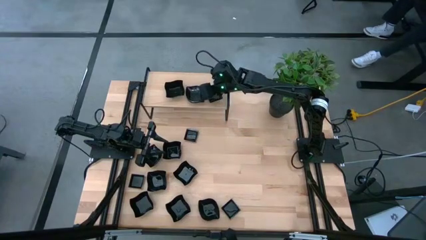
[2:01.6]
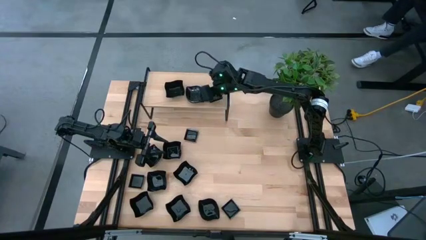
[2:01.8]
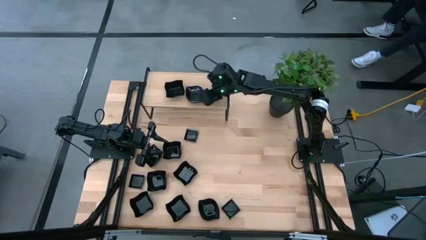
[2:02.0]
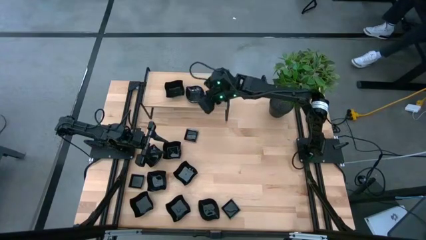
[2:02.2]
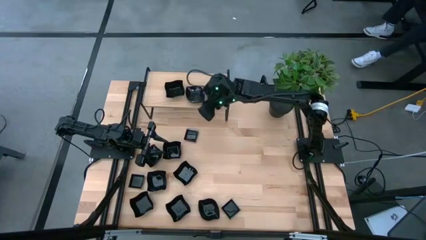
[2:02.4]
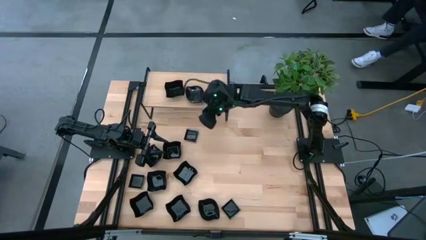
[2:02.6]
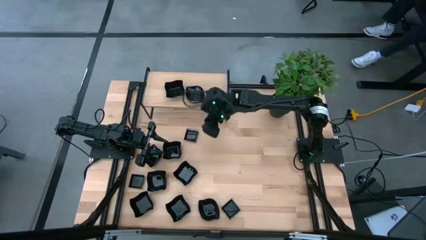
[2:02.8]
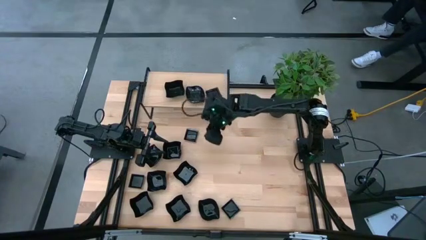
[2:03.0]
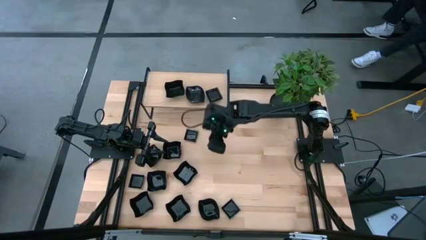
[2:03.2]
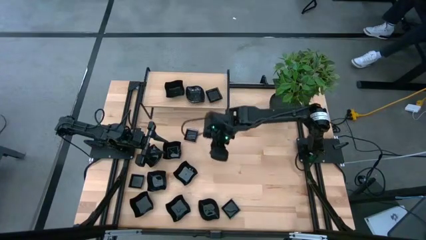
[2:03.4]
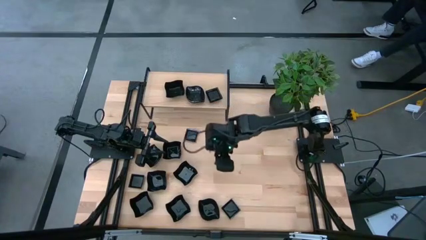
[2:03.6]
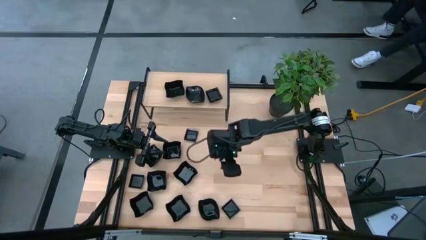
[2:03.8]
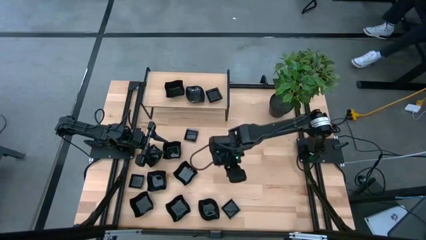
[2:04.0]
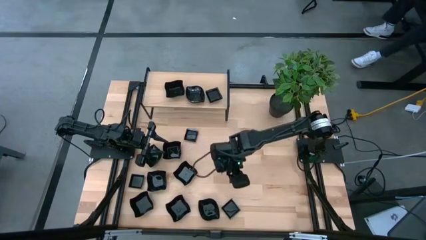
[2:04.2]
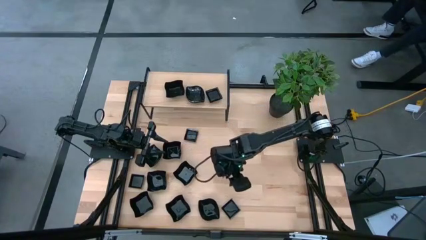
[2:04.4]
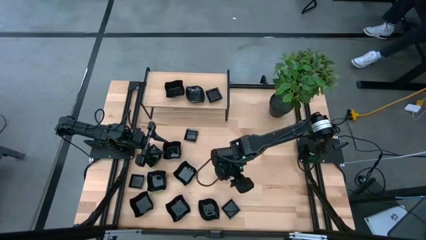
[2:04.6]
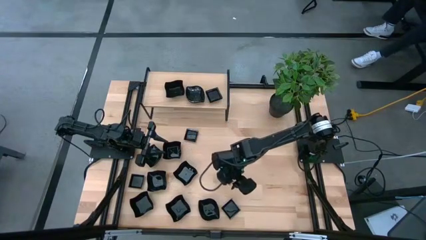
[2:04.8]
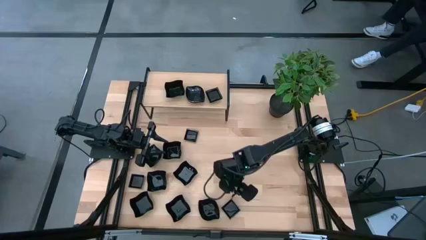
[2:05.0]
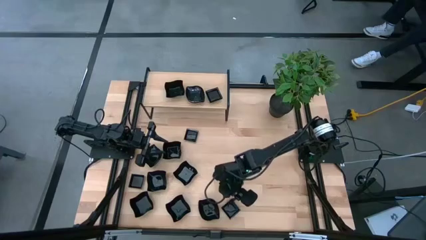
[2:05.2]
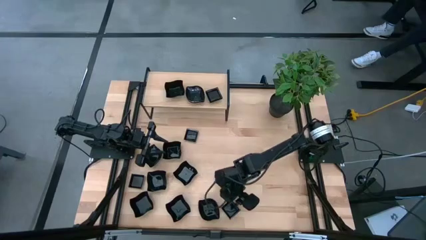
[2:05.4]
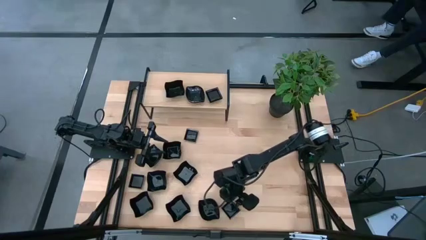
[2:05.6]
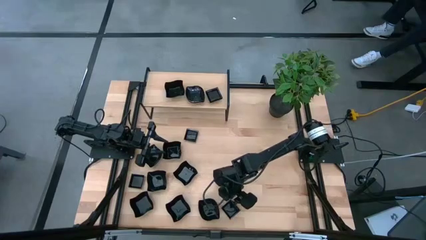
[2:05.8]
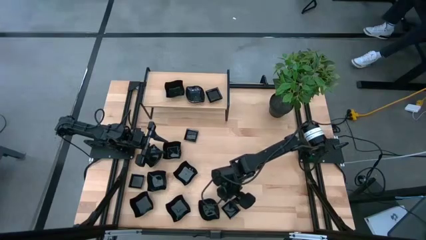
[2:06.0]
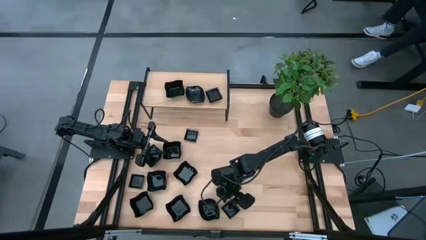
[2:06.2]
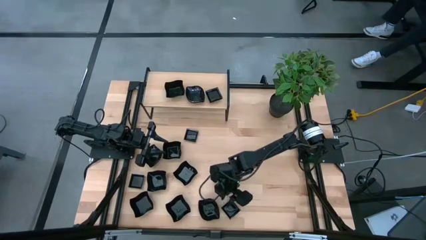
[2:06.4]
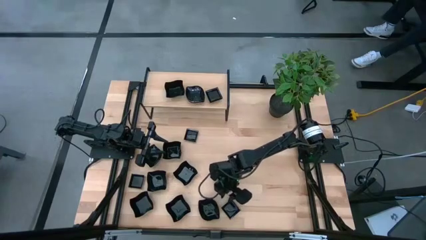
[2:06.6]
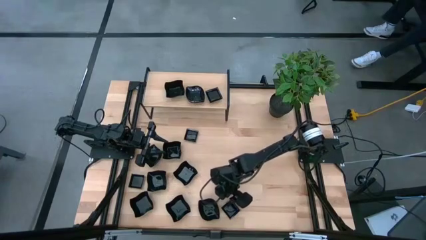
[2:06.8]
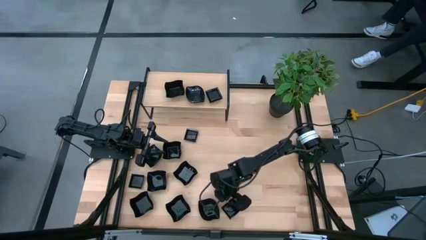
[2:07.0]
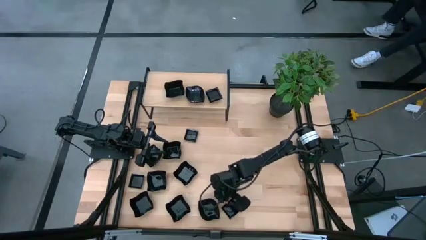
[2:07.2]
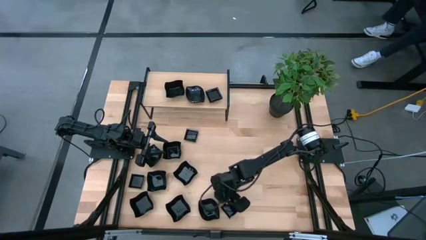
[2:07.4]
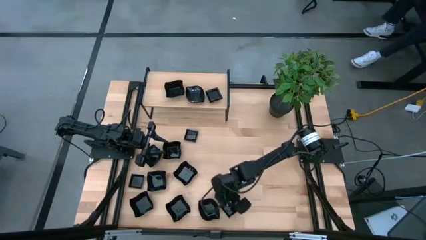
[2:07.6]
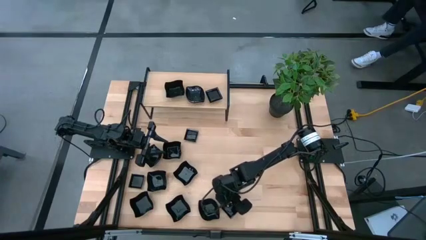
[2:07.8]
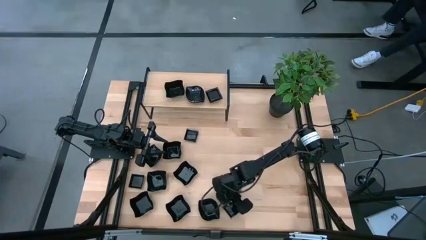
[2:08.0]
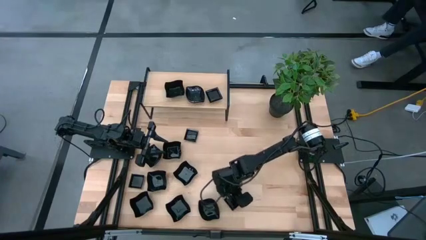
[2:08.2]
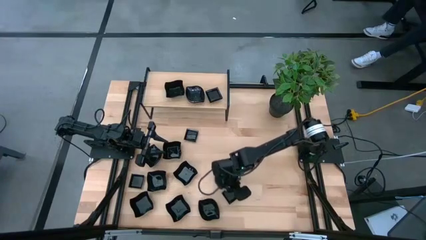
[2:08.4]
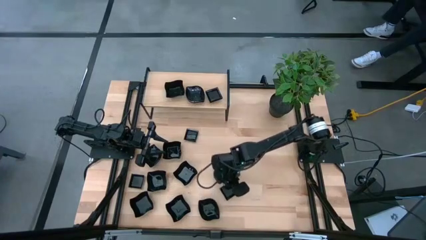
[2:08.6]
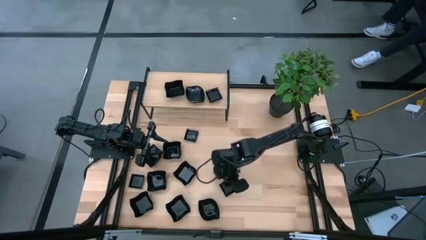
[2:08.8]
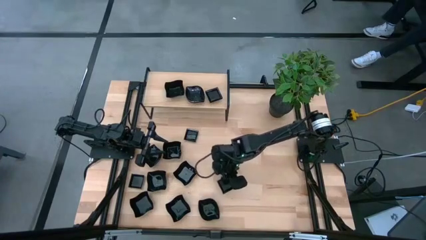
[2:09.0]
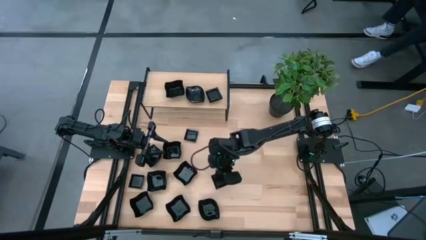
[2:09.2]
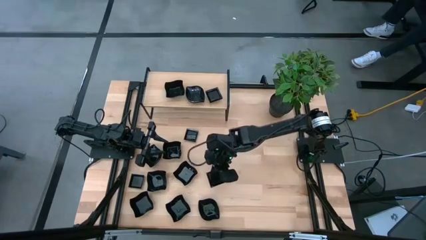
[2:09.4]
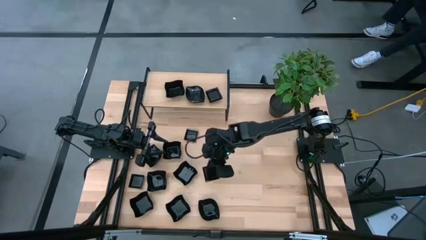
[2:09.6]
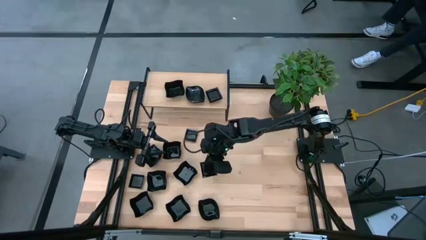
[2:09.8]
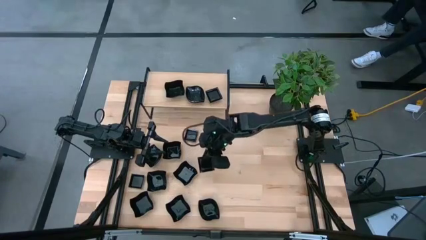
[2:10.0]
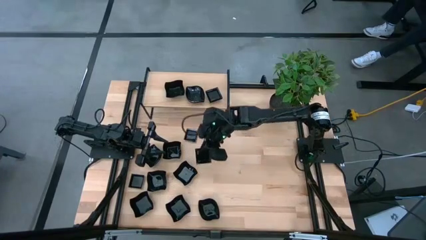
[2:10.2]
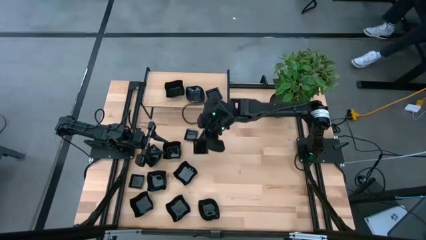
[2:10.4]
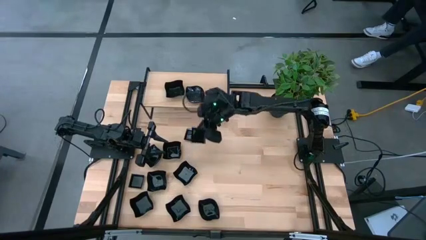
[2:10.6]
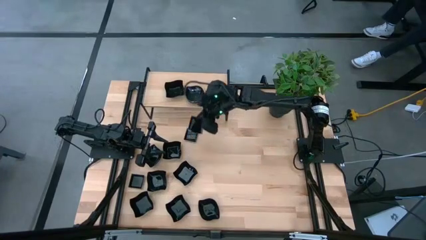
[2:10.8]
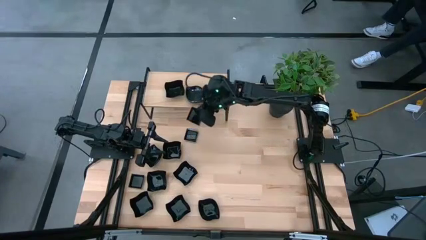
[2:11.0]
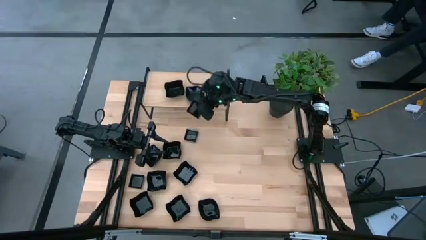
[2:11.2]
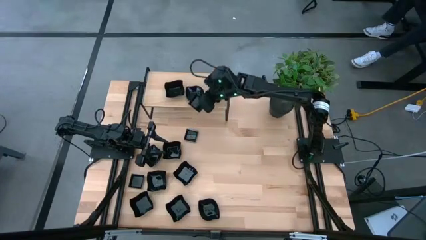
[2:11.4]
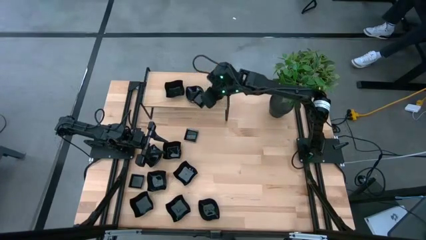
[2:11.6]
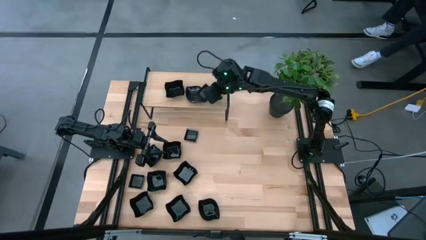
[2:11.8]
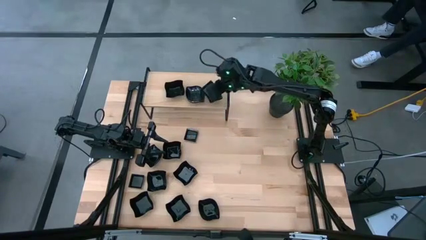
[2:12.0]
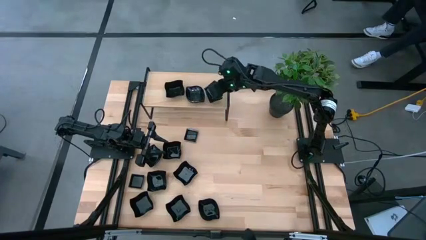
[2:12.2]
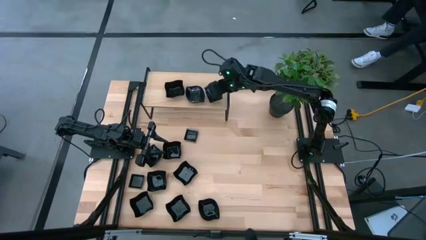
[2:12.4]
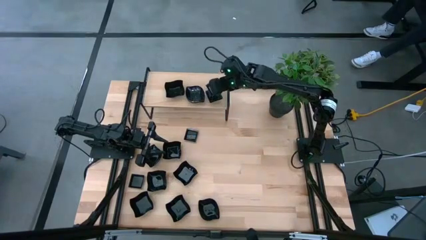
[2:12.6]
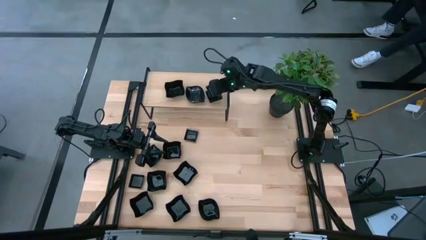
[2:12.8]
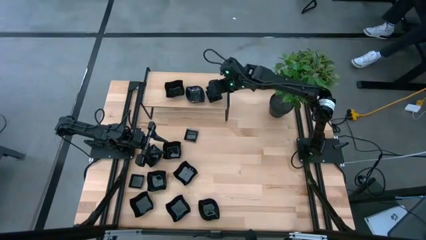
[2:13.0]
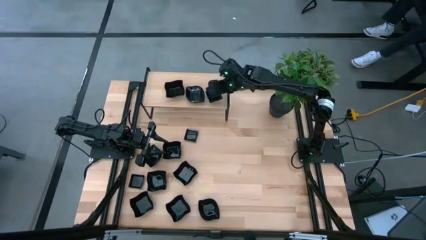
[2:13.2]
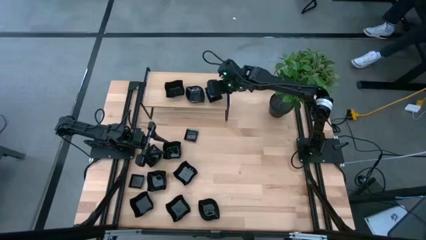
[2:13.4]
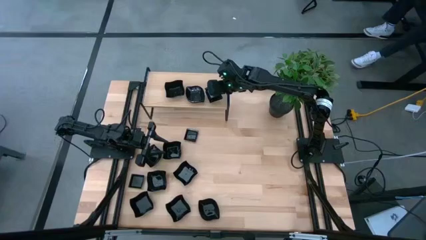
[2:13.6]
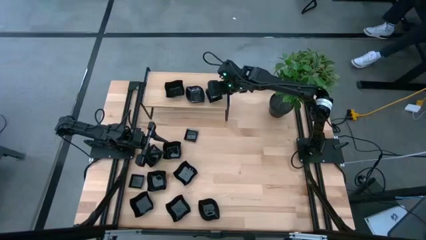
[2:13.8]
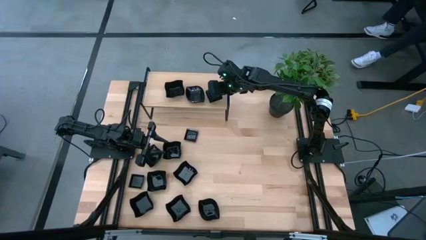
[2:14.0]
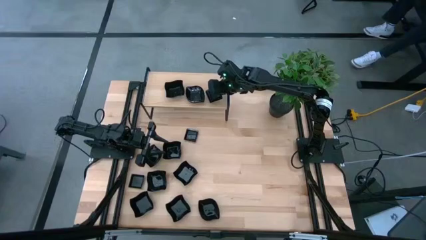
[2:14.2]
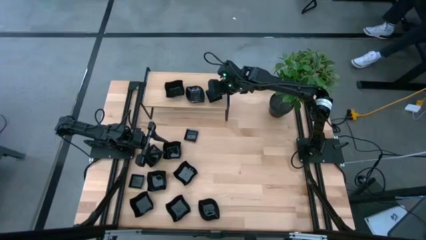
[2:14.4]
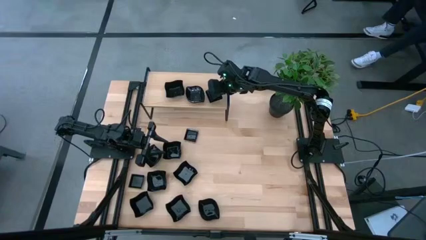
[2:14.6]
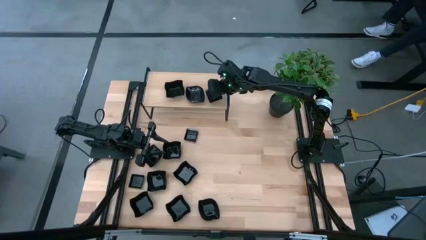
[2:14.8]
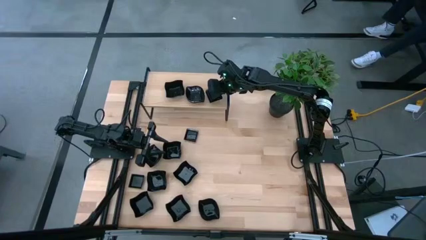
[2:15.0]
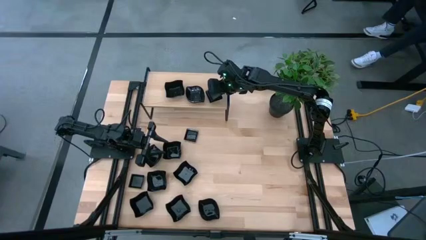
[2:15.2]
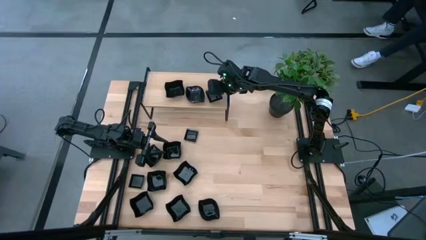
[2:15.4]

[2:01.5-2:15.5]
Task: Pick & Place Mini shaped plates
Stack the square plate on top of the square plates on the shelf

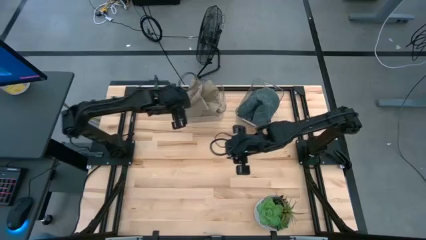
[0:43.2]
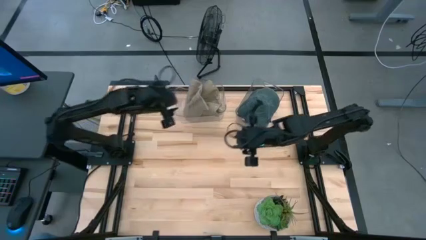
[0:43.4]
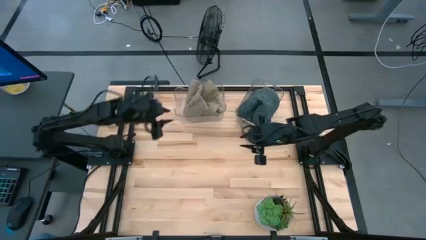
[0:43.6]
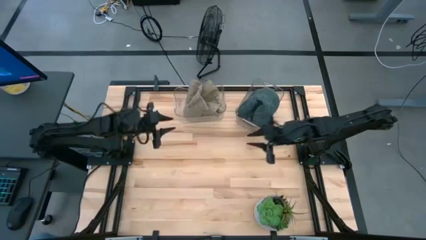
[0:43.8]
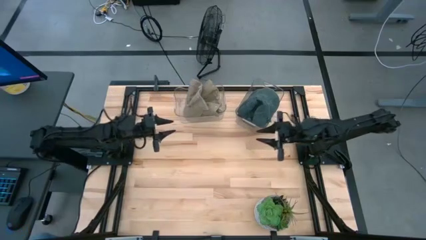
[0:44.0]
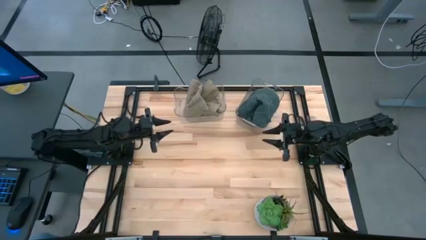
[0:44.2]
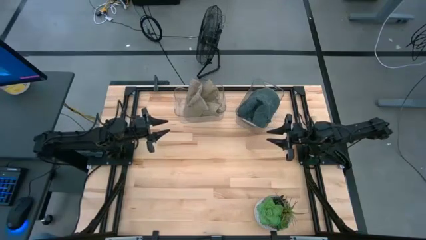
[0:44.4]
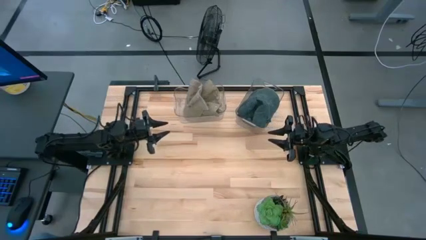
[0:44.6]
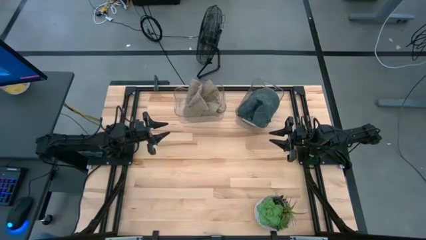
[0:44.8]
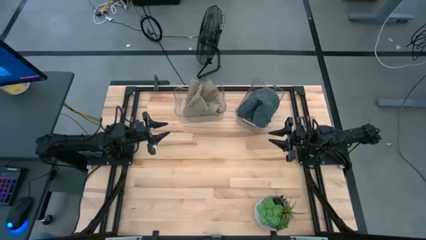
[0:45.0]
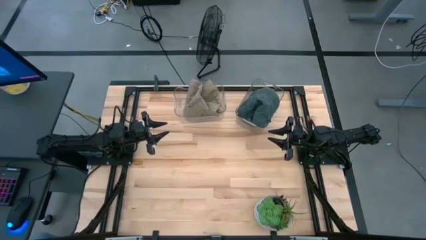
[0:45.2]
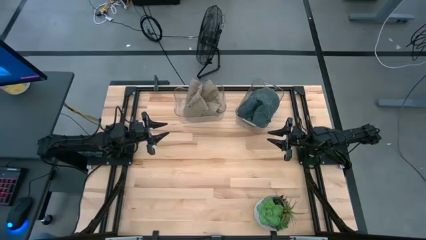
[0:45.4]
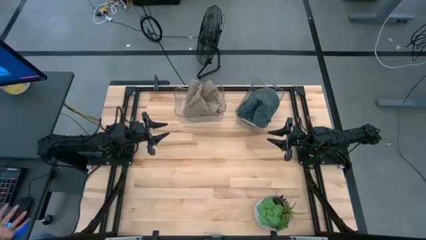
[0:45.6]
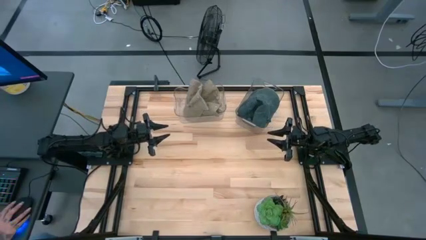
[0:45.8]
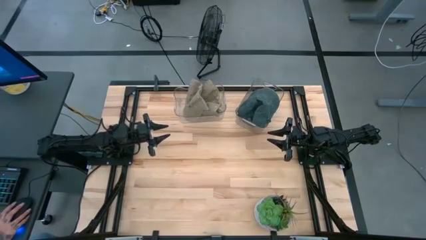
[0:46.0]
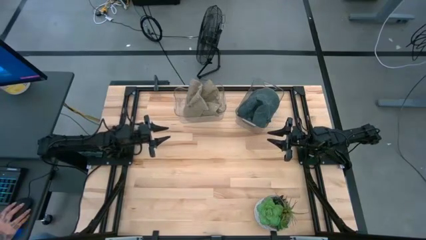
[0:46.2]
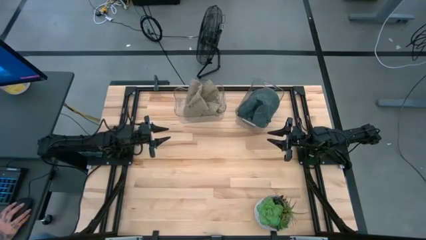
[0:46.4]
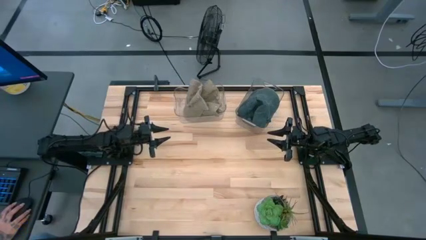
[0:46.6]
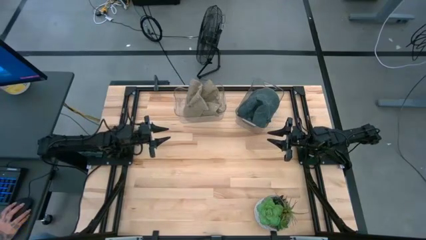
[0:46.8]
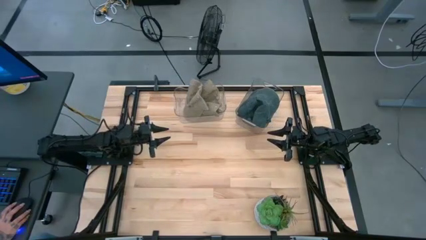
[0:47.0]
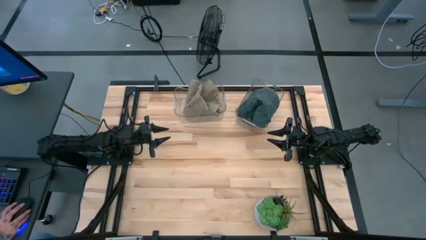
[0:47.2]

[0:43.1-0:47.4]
Task: Pick & Place hat
Return to Home Position
